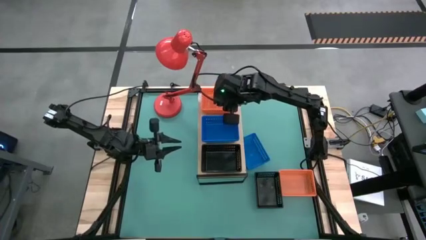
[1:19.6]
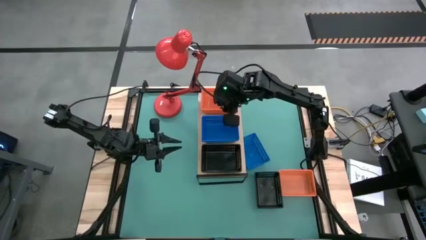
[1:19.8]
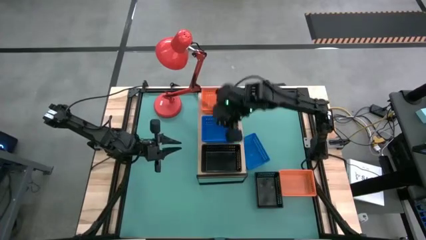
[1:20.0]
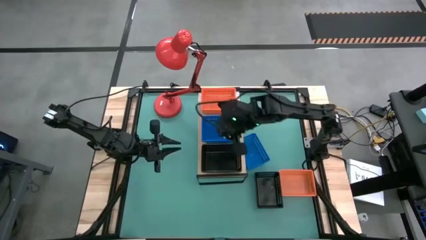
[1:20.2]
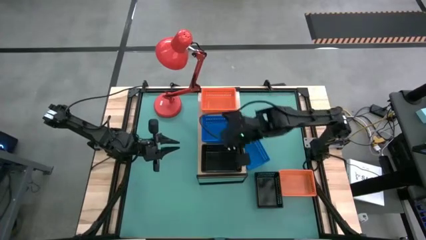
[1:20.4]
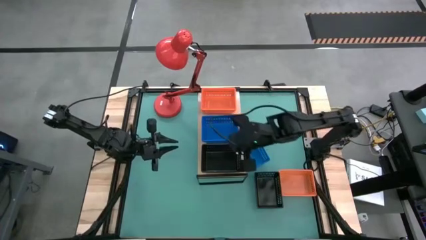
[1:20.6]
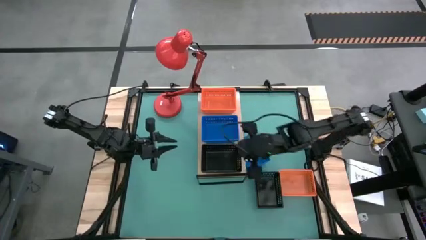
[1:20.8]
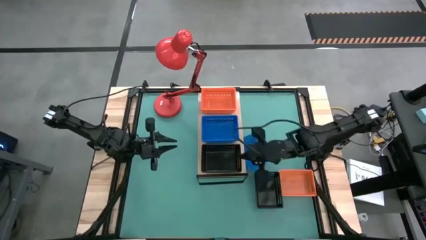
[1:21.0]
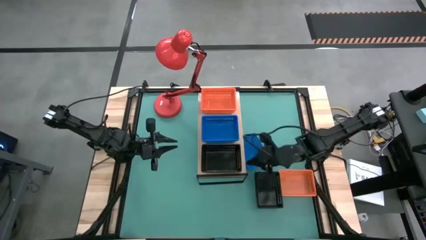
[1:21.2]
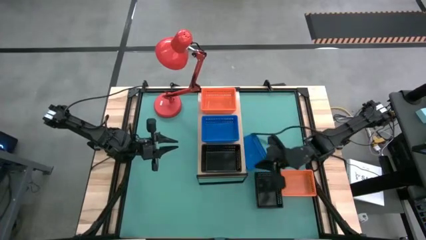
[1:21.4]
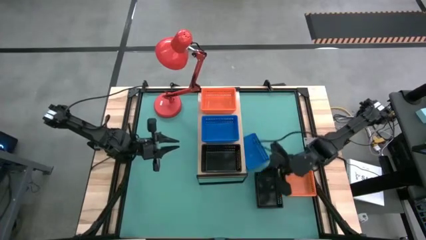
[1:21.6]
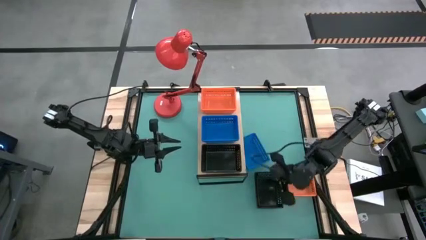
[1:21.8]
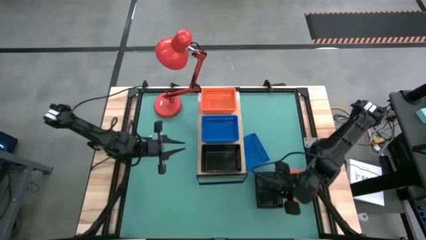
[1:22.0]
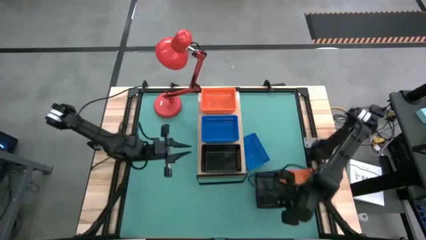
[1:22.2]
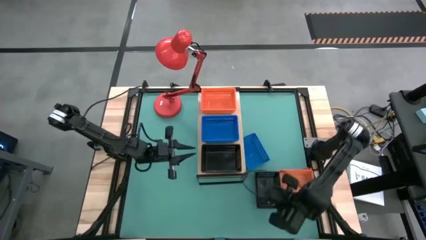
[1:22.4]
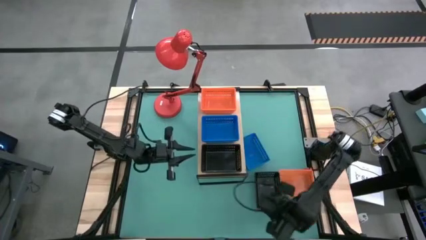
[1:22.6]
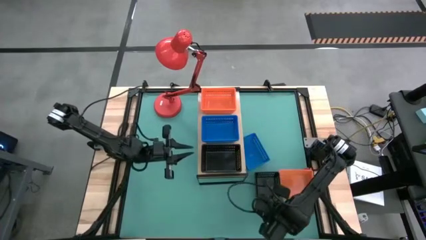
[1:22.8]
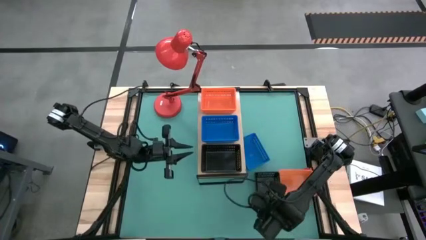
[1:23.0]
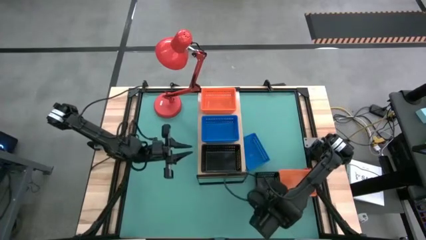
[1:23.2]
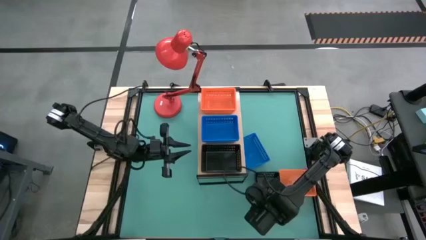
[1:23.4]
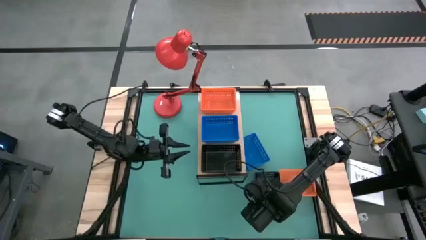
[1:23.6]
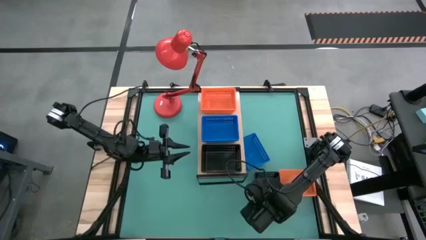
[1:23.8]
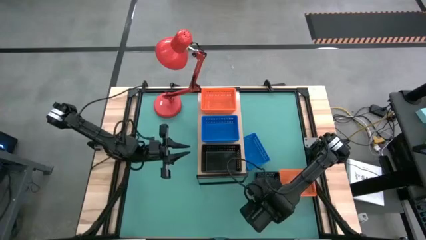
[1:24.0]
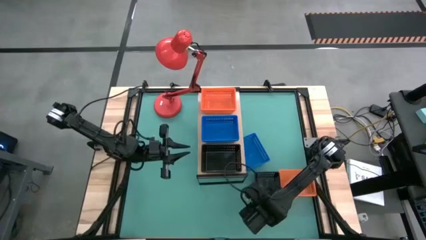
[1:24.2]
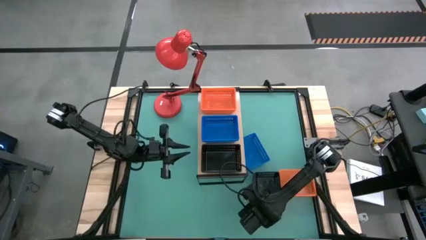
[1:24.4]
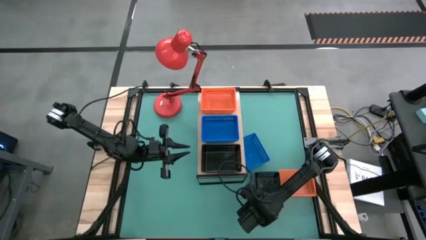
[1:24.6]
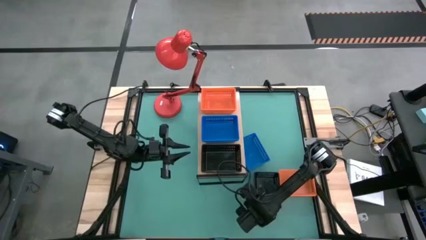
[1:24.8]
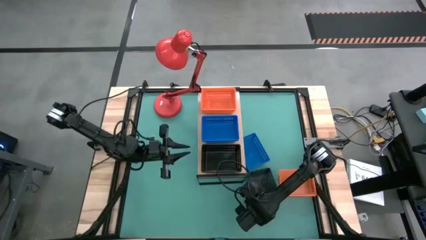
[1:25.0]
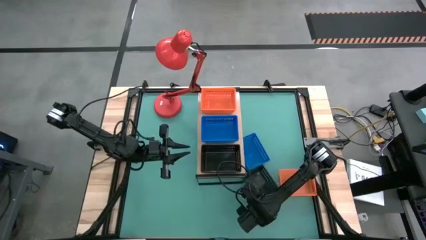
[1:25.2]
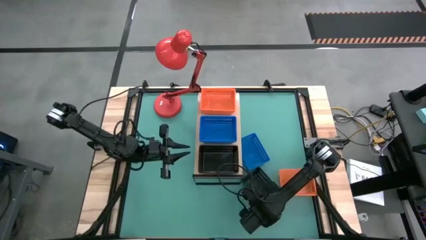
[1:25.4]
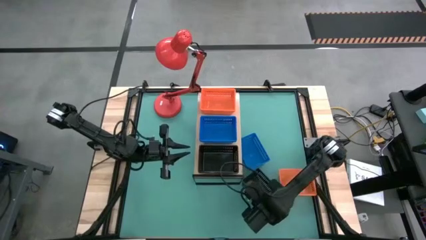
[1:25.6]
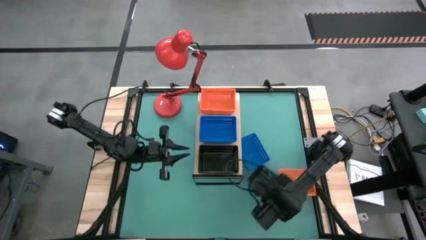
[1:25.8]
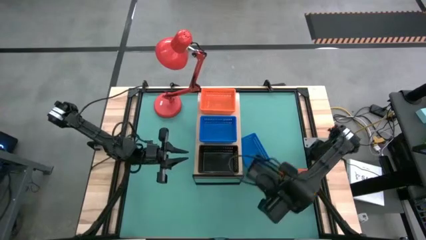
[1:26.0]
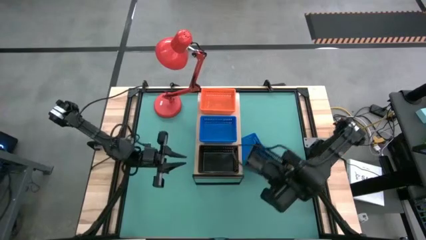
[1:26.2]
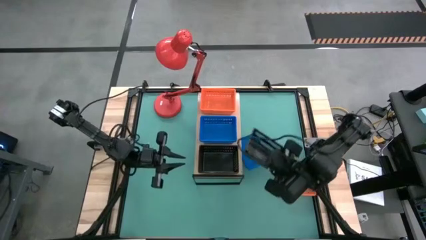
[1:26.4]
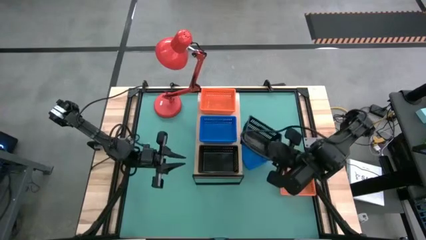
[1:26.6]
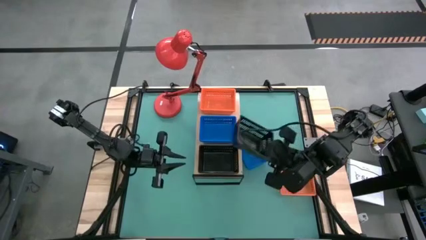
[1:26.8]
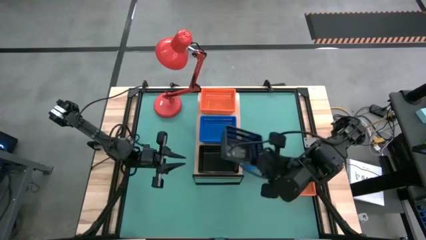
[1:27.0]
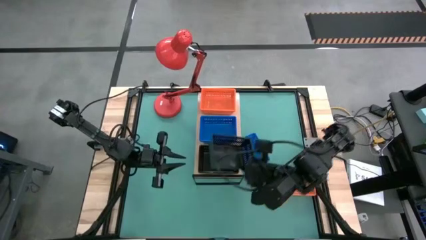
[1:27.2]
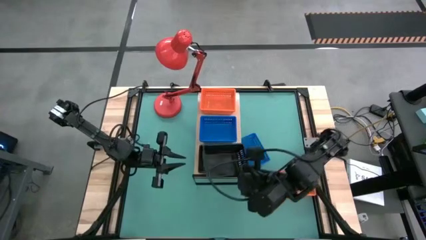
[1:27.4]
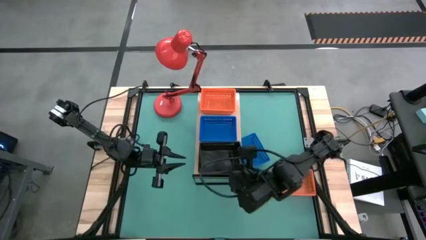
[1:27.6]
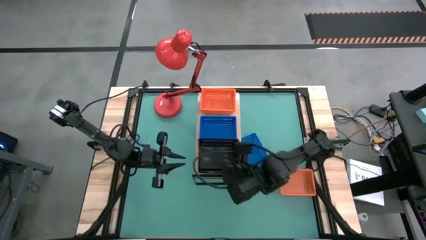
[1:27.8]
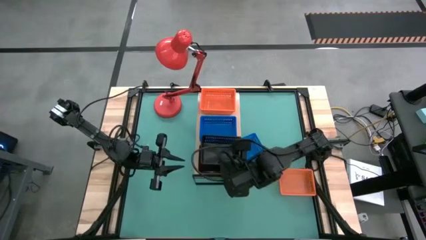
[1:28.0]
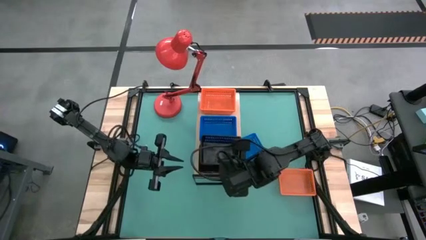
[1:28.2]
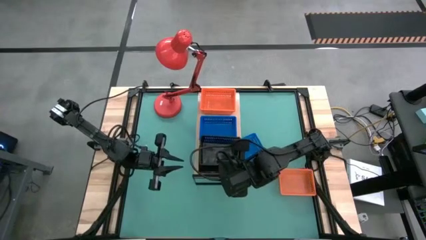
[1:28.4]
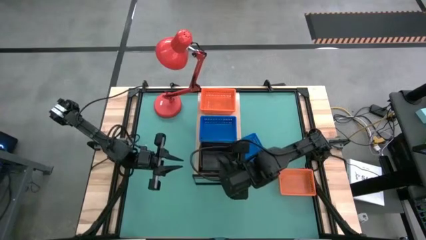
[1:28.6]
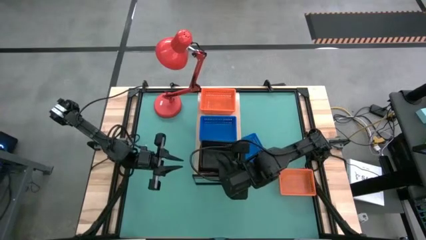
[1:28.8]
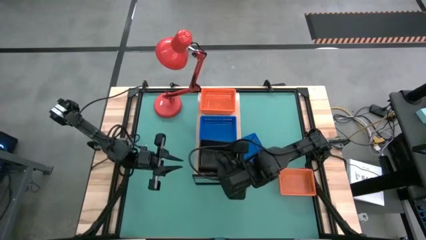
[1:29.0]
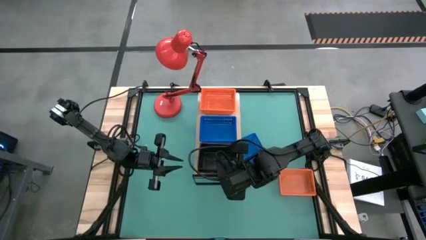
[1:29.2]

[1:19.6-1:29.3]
Task: Stack baskets on shelf by color
Stack the black bin on top of the black bins on the shelf

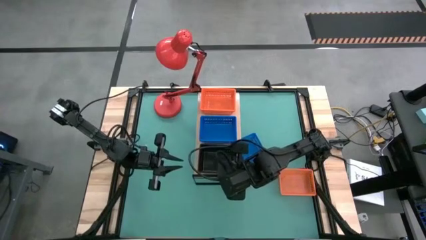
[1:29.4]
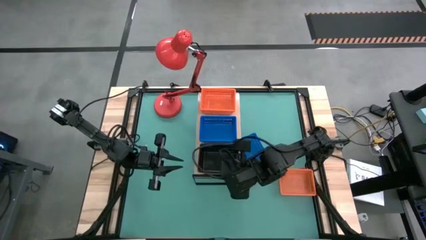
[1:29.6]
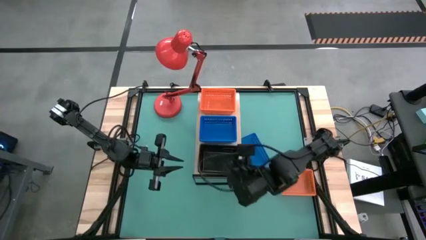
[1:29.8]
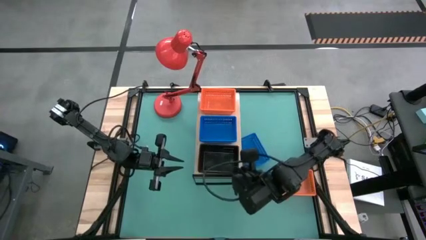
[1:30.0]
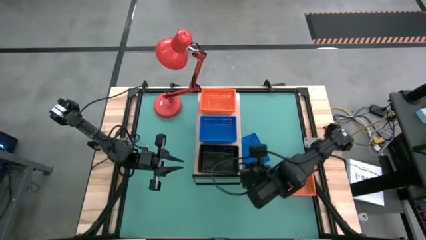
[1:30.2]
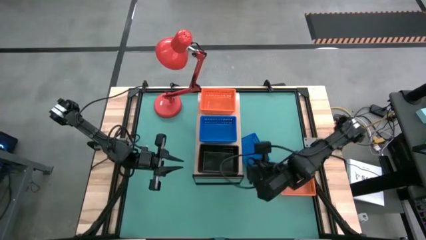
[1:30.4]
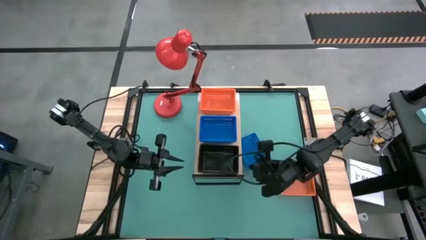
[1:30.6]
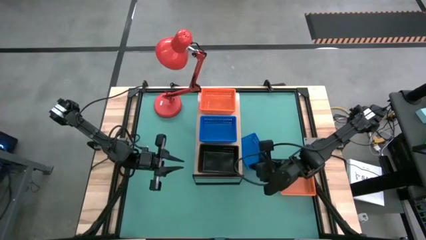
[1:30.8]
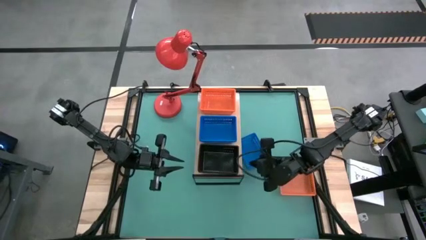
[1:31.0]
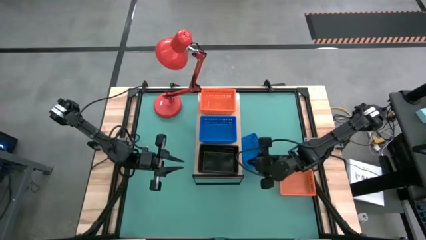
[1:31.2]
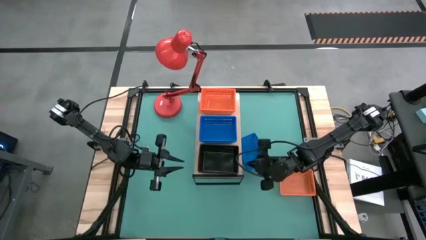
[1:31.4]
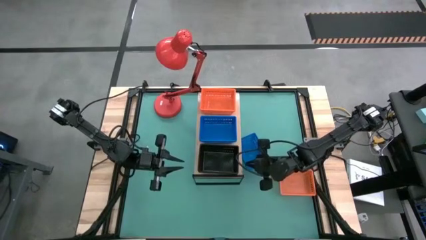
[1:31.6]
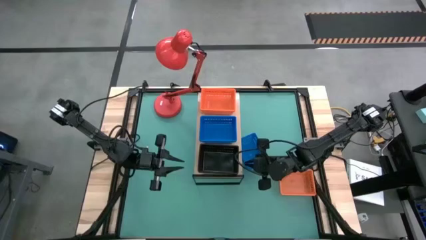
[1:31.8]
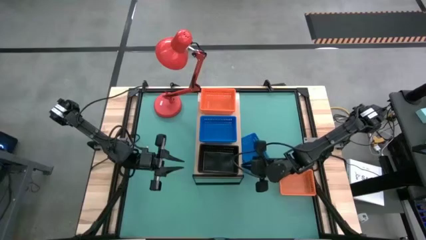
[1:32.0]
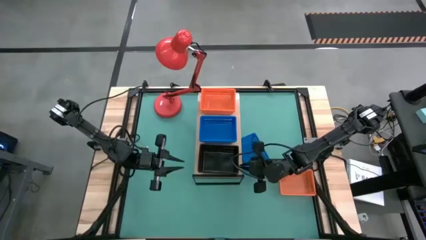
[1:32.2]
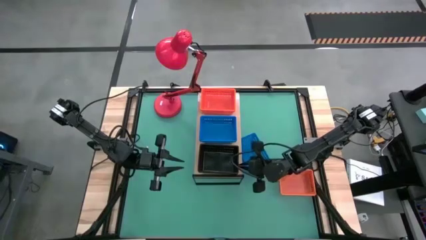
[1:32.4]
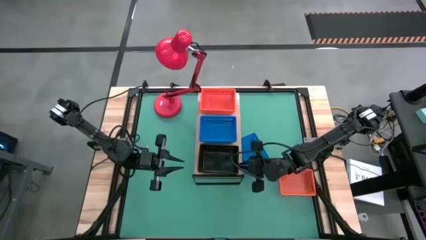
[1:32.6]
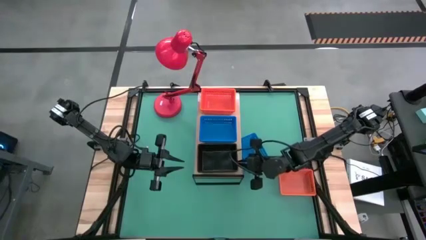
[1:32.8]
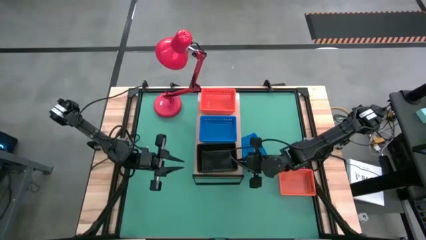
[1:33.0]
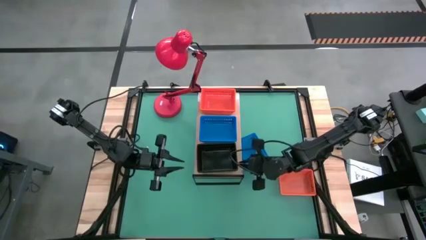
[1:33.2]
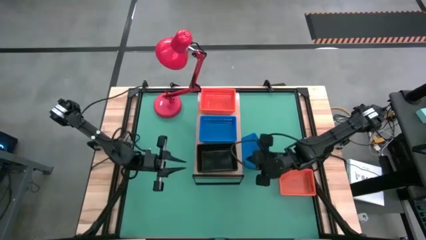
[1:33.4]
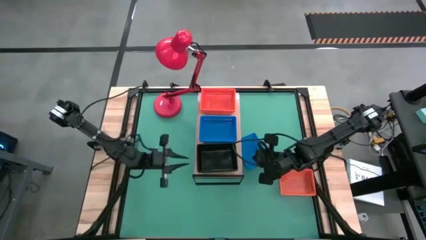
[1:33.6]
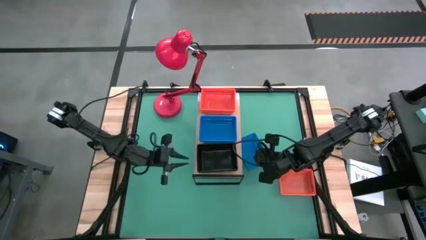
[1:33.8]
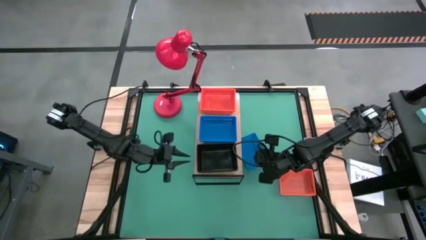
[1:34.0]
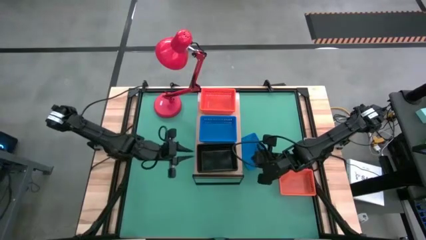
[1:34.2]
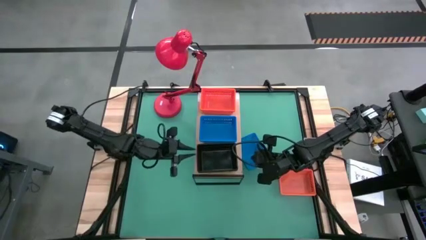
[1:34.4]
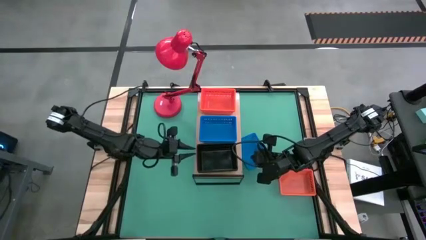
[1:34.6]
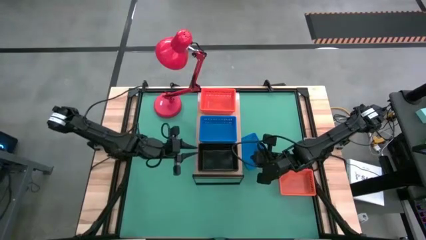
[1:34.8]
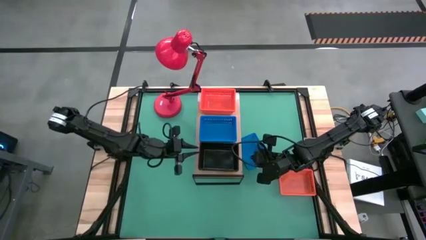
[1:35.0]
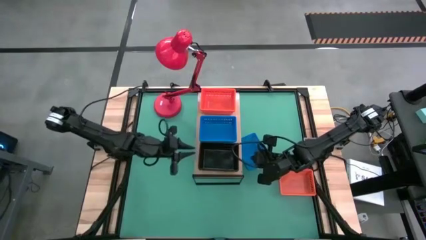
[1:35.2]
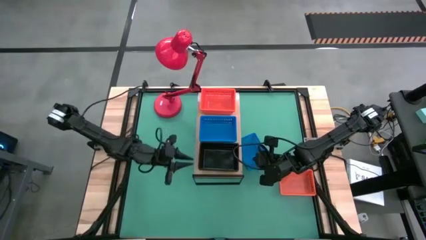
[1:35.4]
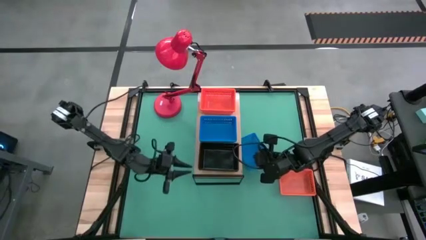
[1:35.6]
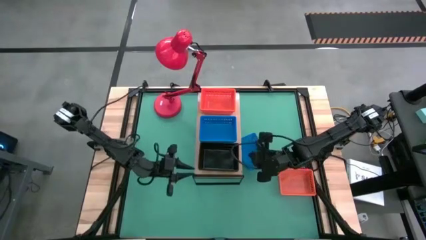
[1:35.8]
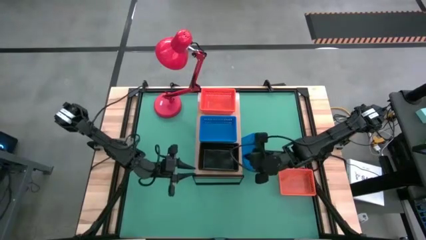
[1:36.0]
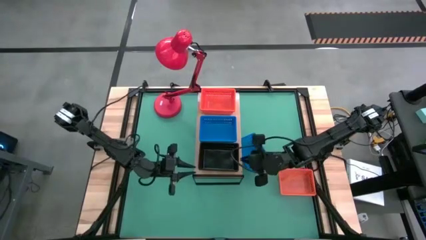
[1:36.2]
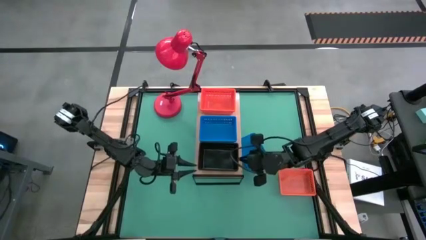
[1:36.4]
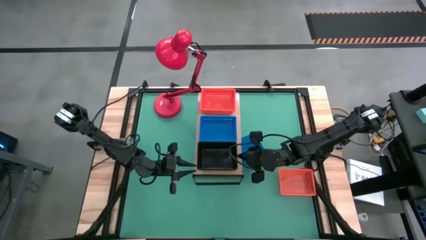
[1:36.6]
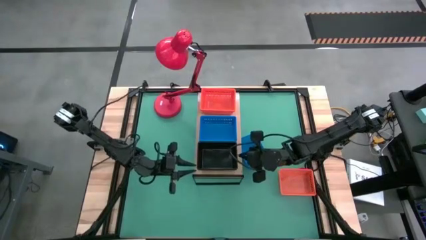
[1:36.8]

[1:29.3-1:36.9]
Adjust the black bins on the shelf
